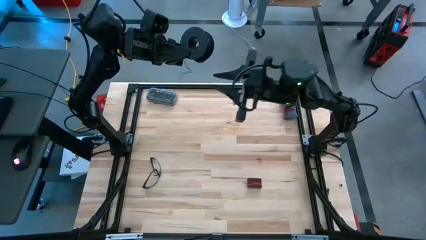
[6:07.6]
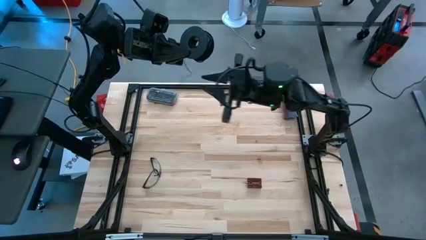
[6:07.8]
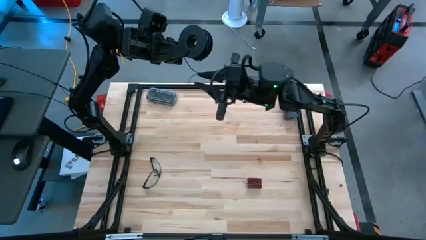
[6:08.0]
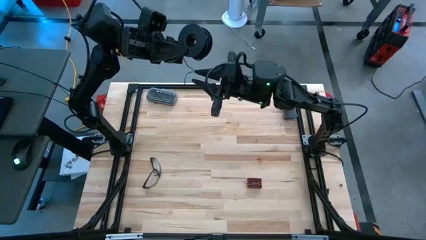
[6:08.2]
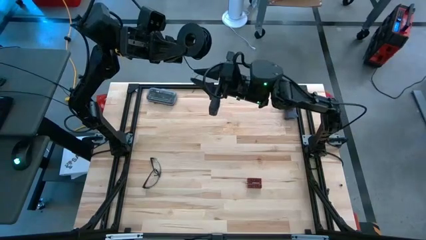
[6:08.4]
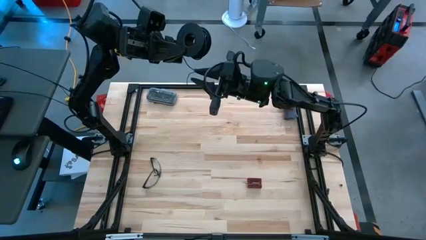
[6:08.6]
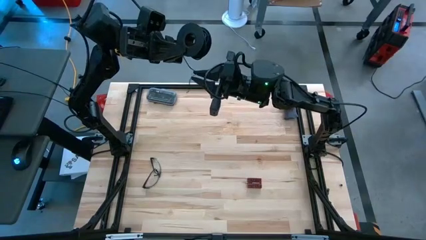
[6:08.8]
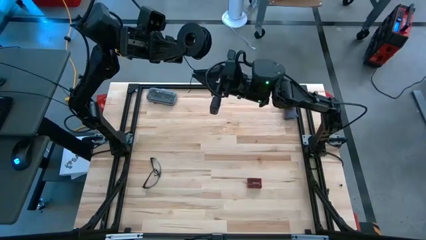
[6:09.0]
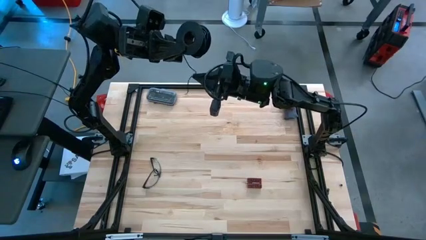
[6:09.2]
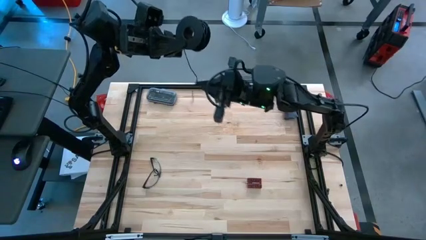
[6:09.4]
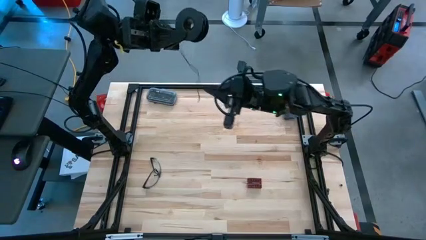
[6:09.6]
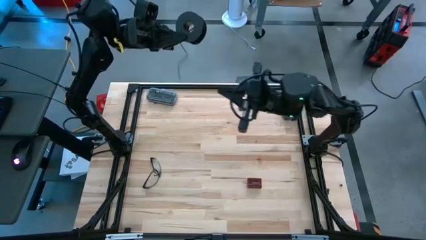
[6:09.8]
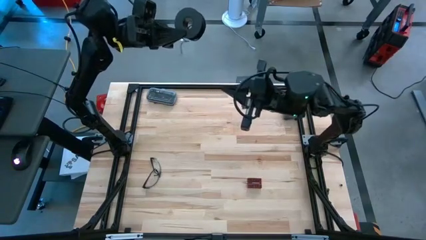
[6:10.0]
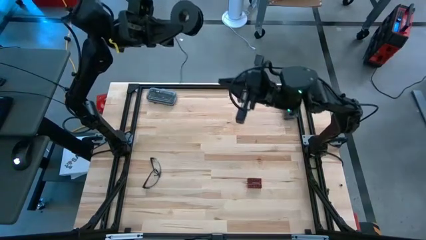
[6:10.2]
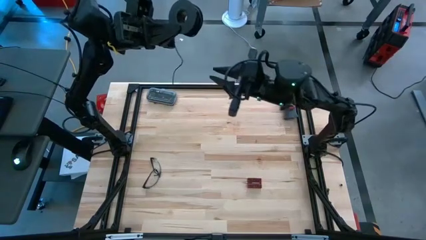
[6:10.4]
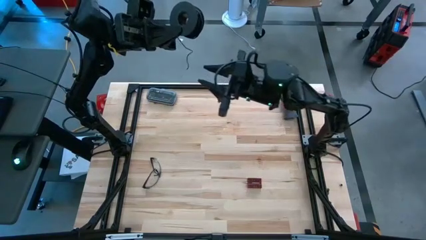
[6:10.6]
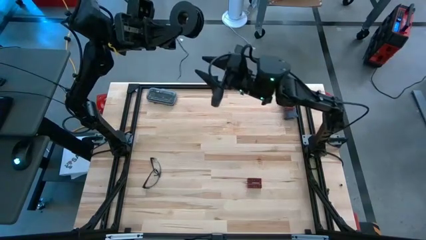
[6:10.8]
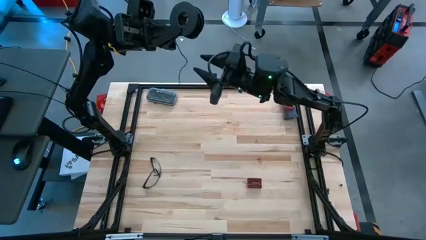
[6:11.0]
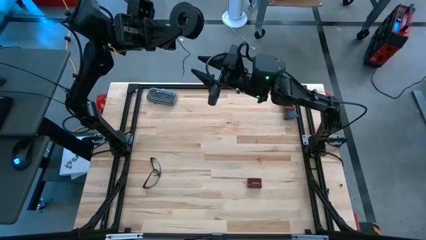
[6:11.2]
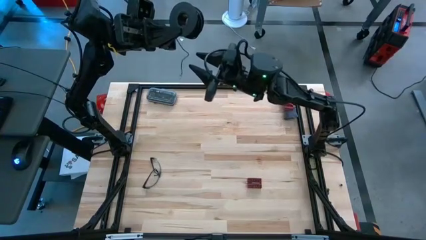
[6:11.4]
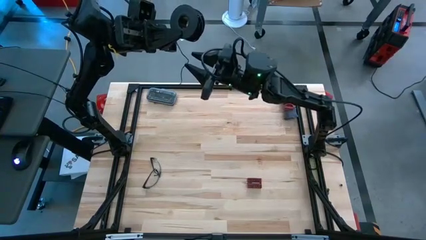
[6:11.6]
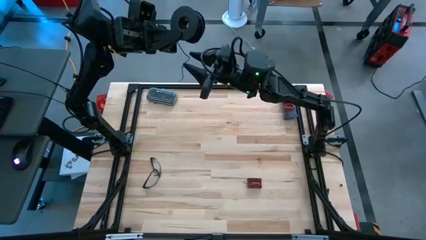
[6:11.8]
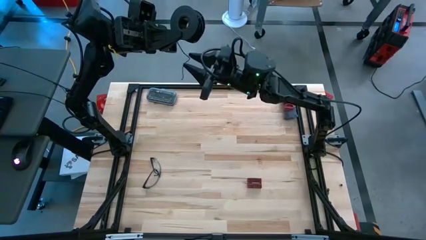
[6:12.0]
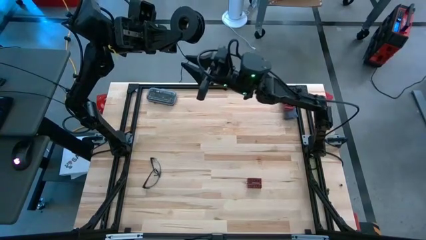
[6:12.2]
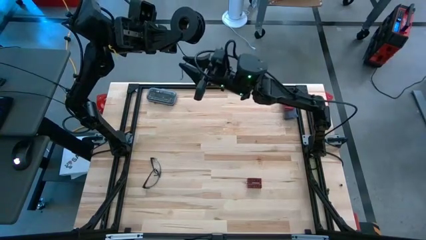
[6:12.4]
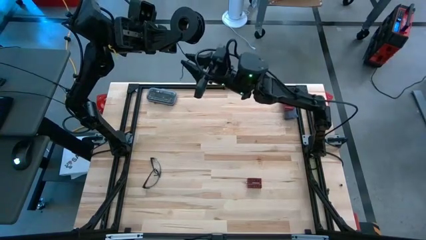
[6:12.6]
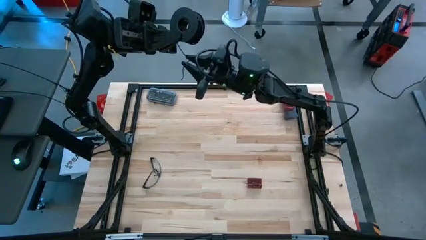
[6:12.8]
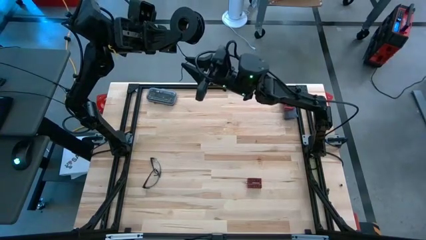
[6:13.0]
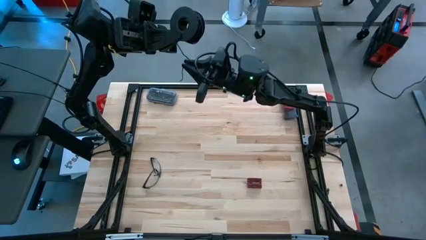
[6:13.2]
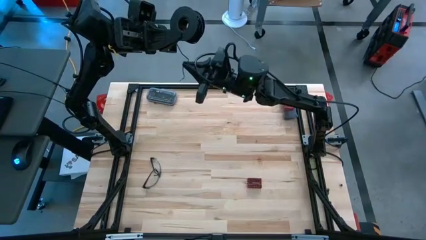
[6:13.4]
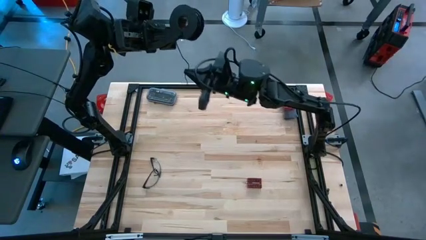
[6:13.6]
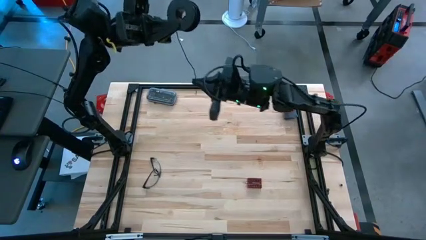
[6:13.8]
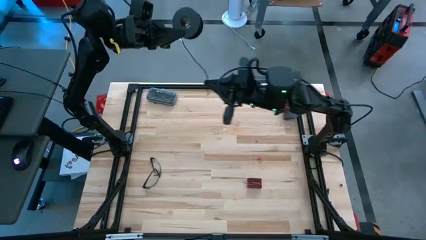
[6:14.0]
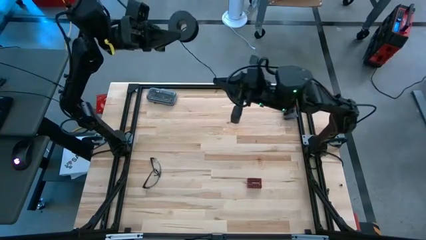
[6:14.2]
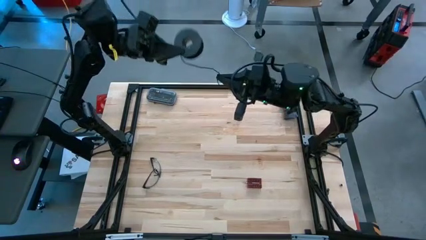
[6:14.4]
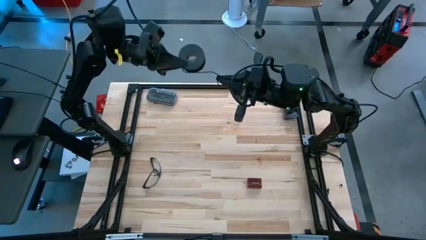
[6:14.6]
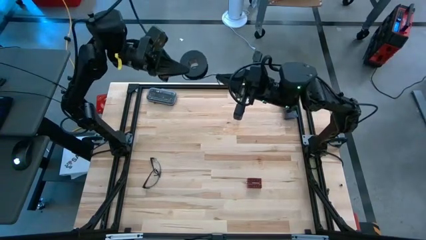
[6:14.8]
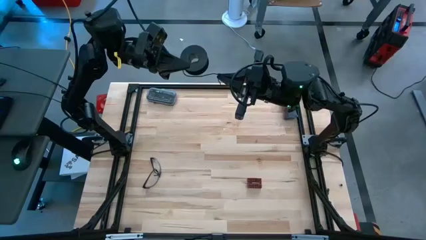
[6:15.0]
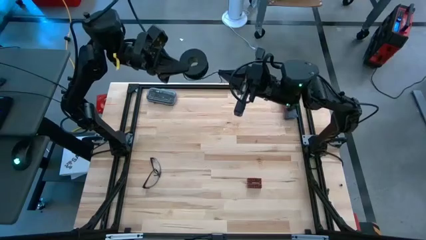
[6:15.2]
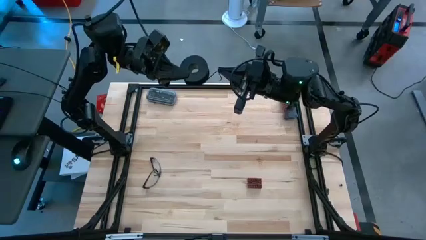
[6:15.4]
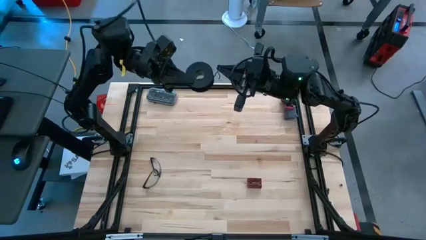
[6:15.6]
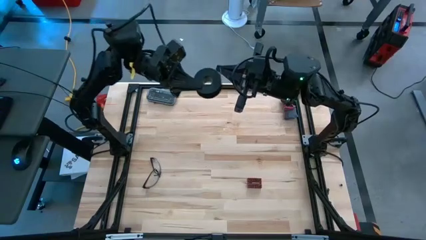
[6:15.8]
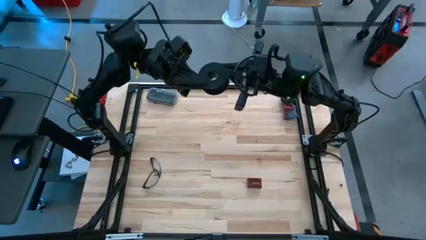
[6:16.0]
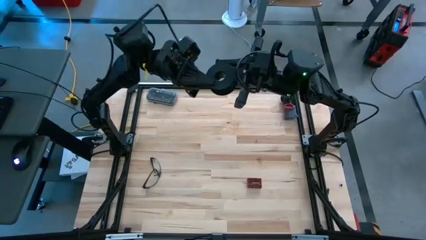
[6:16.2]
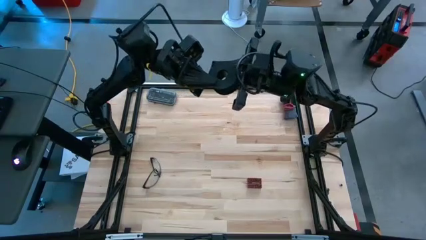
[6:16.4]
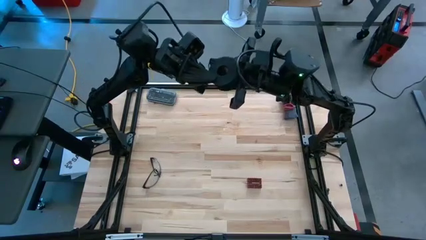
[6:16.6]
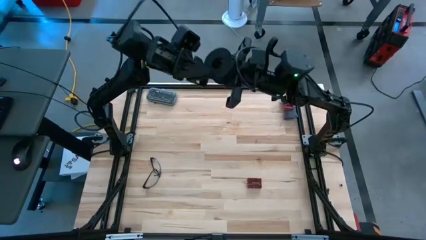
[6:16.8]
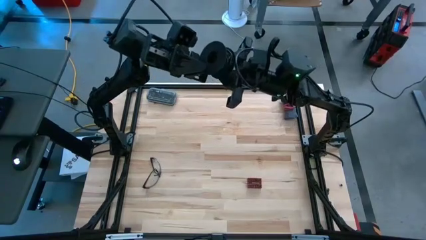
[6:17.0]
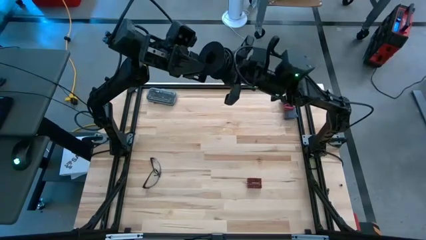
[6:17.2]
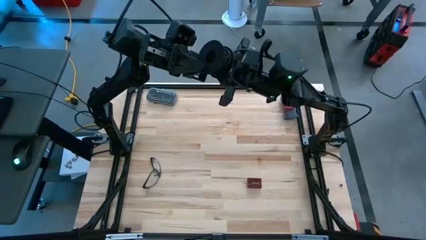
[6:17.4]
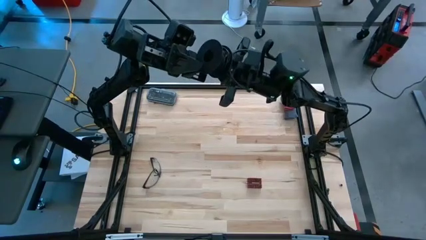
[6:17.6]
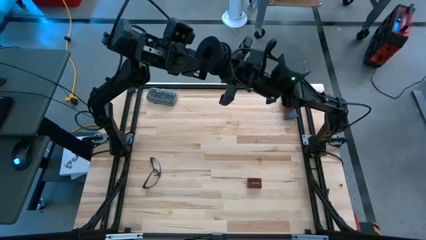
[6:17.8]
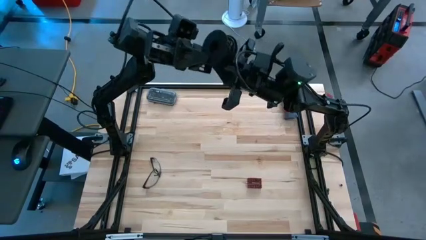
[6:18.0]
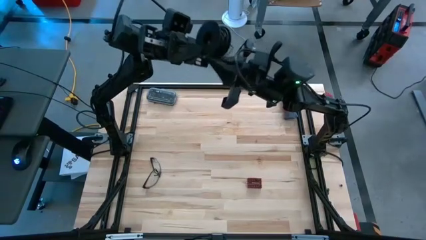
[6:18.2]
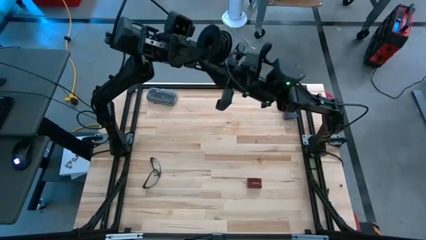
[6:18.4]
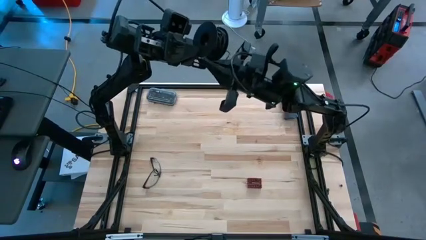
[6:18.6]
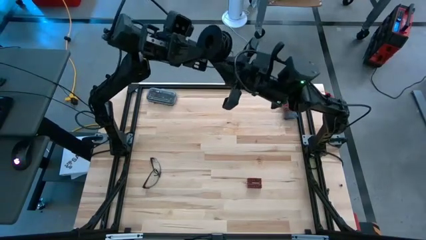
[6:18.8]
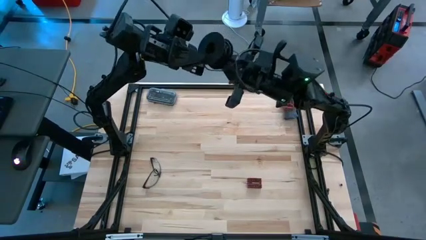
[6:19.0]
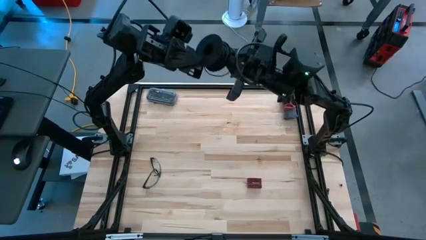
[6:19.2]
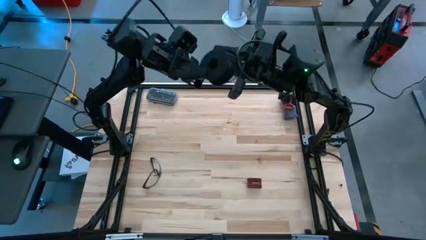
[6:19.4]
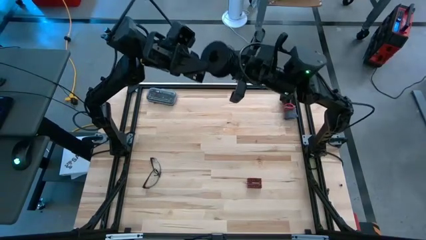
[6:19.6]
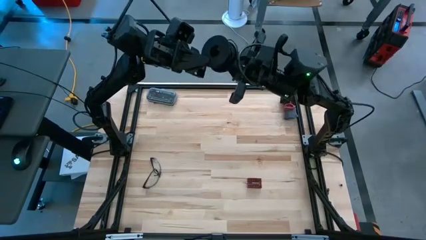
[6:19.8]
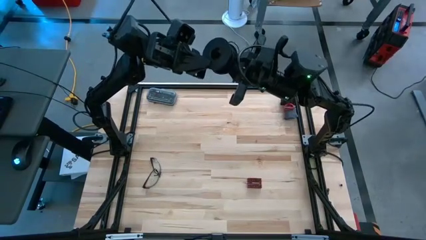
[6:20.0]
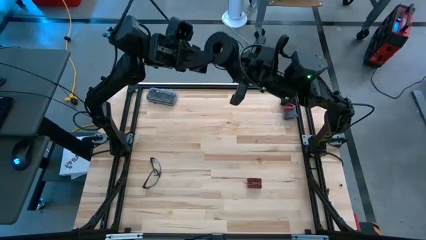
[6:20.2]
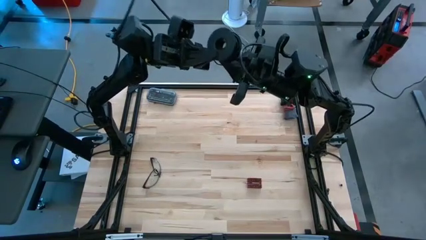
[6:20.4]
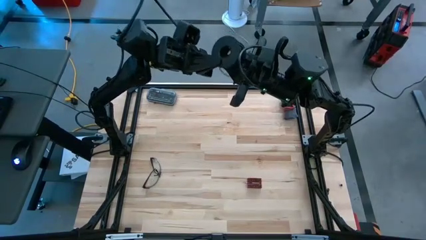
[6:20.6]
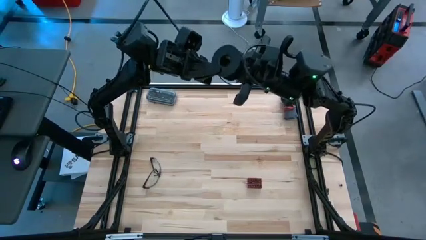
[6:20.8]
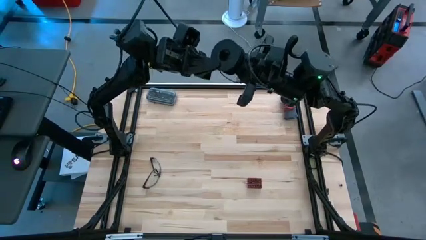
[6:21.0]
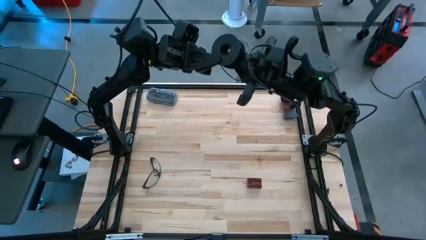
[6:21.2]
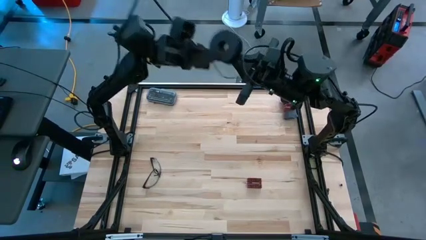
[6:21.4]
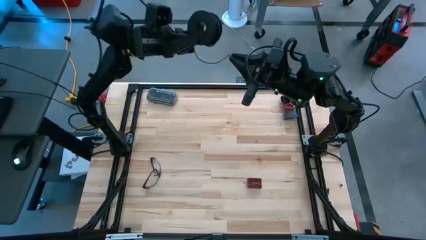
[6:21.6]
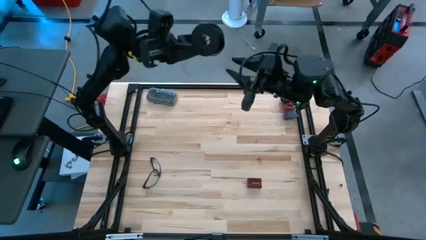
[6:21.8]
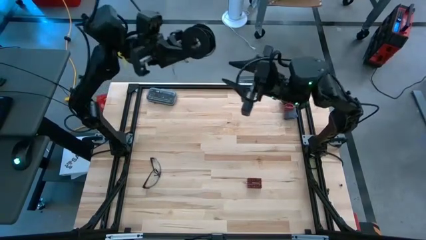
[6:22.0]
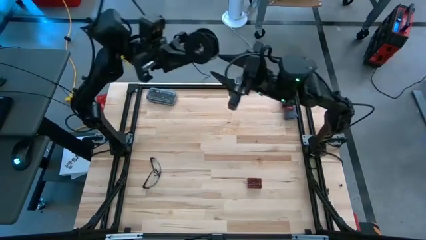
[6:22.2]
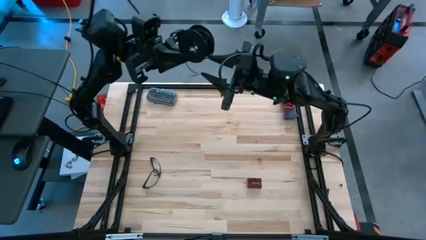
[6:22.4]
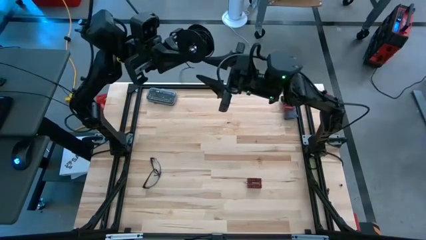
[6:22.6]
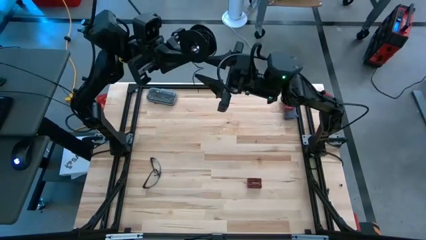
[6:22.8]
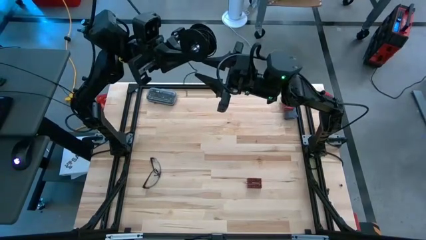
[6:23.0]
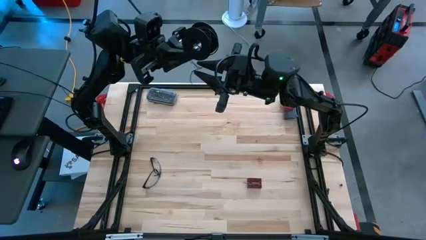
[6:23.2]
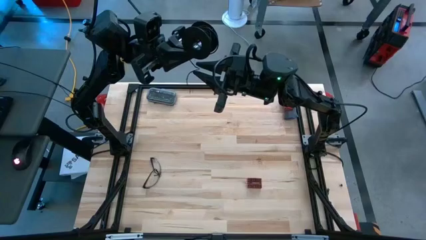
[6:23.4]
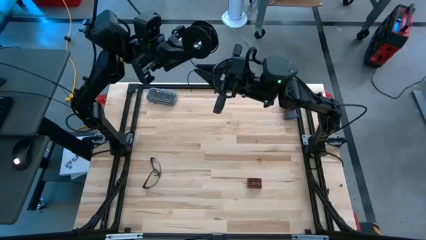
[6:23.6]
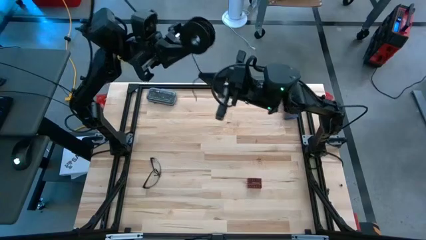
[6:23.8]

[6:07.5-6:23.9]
Task: Coil cords
Coil the black wire into the spool
